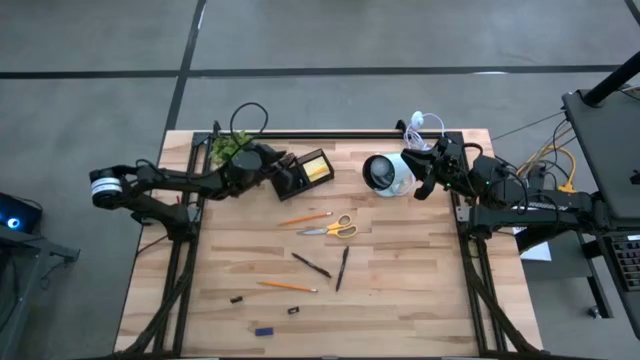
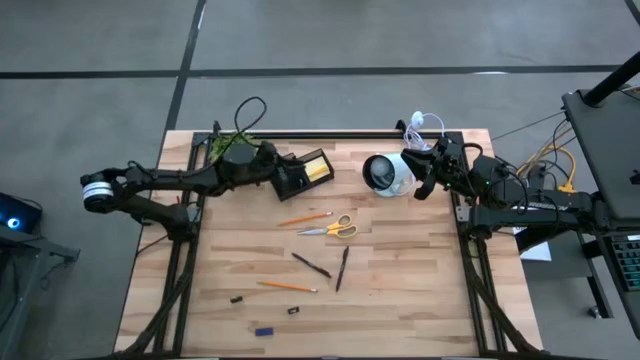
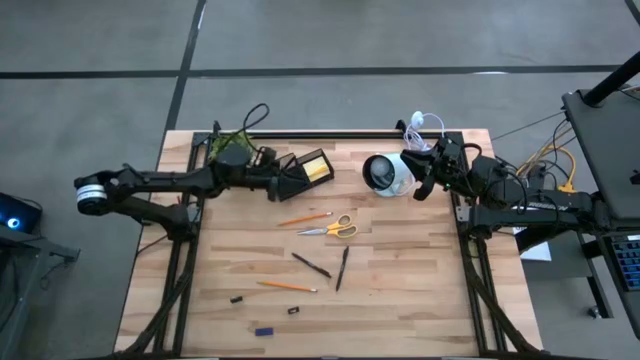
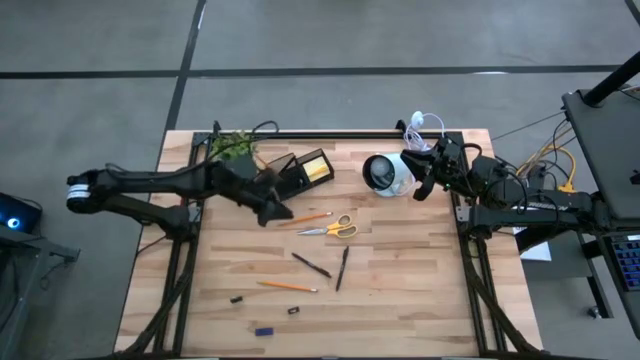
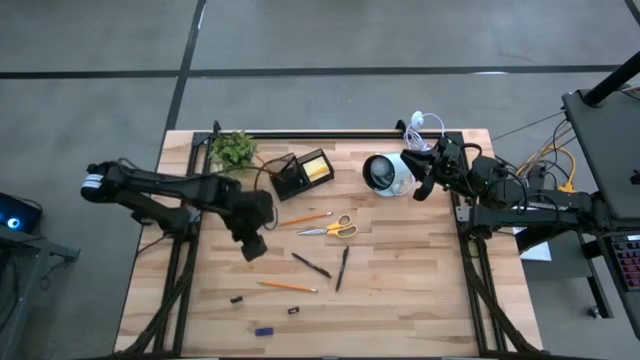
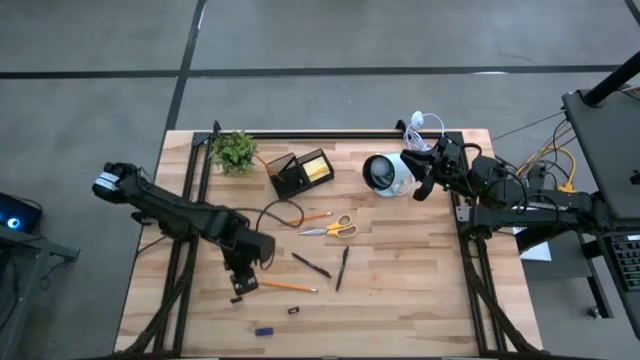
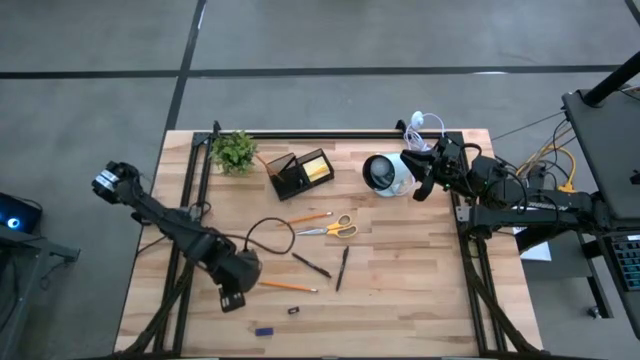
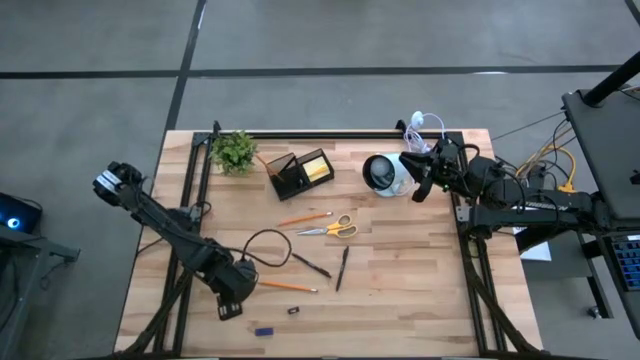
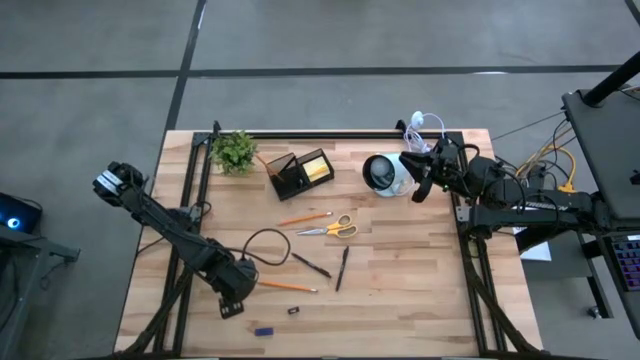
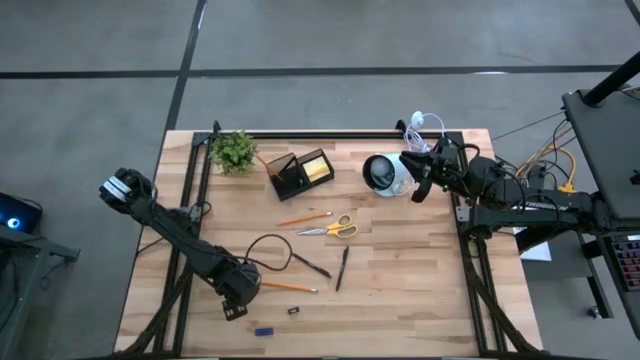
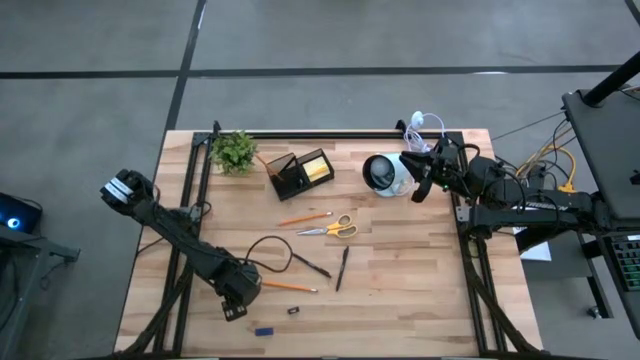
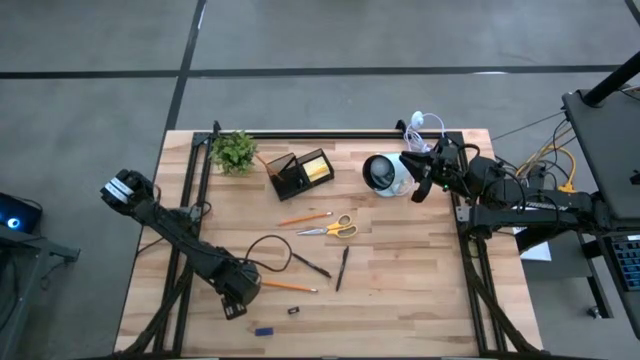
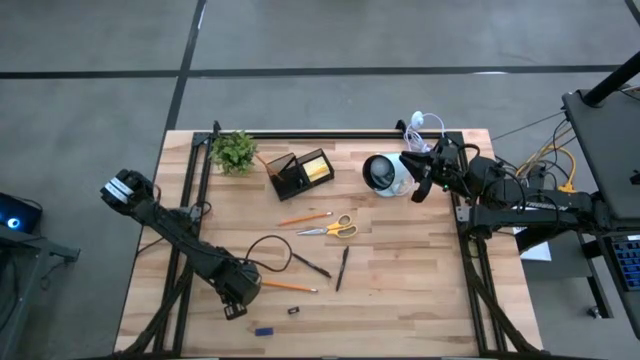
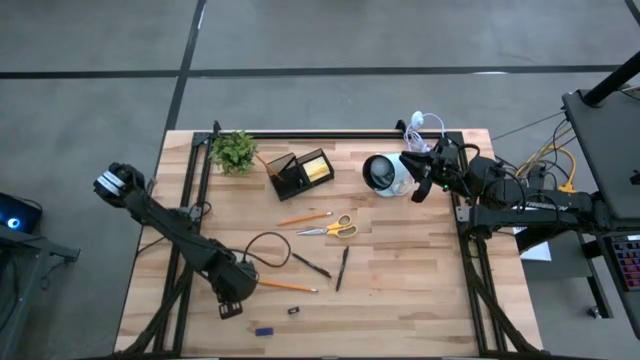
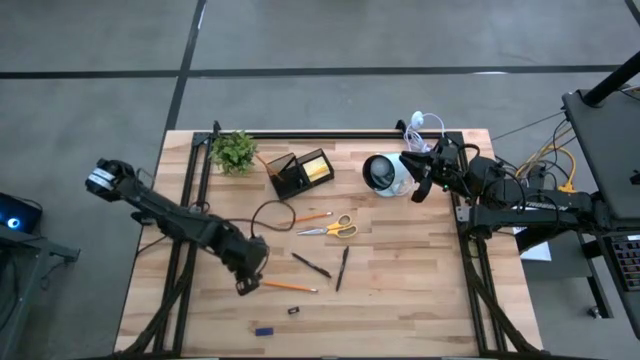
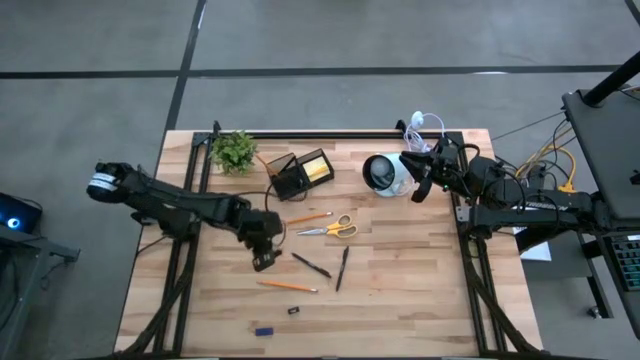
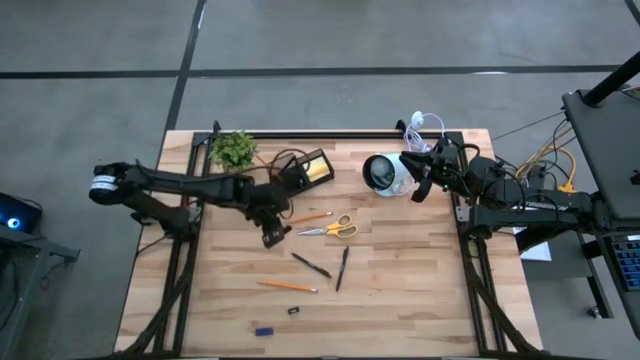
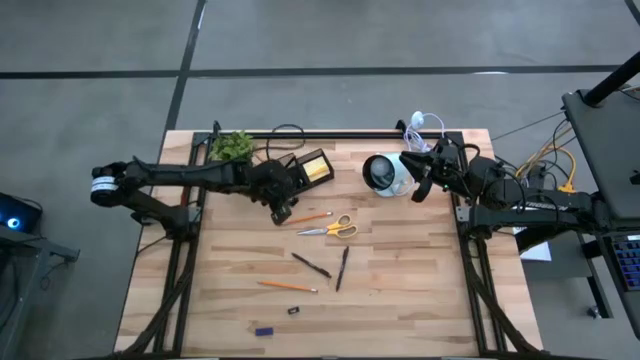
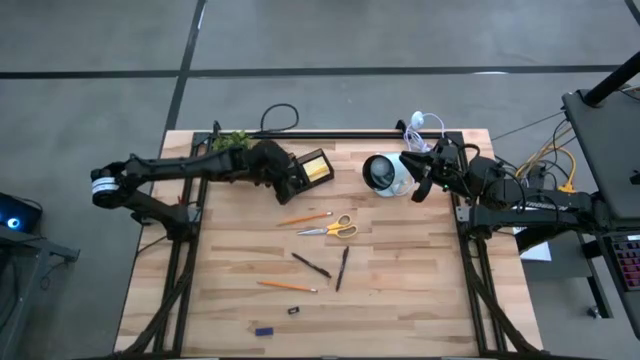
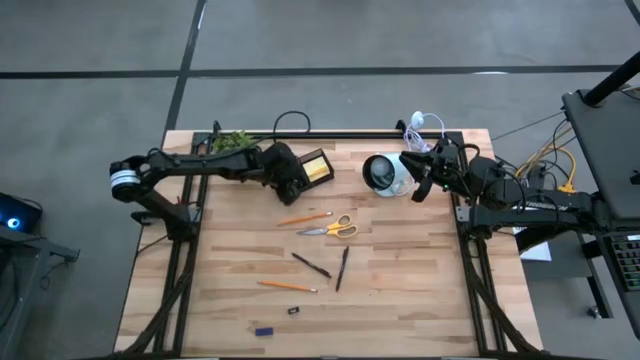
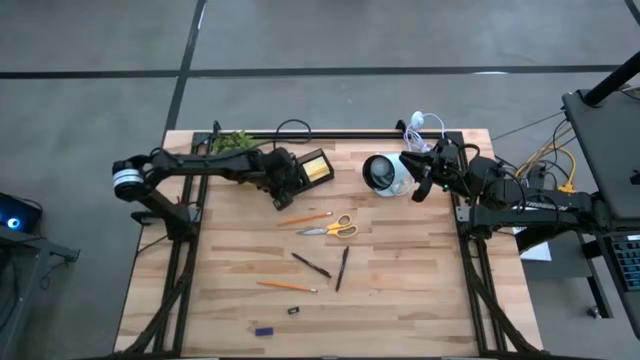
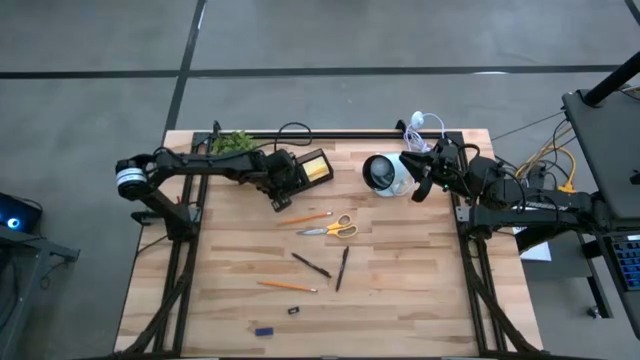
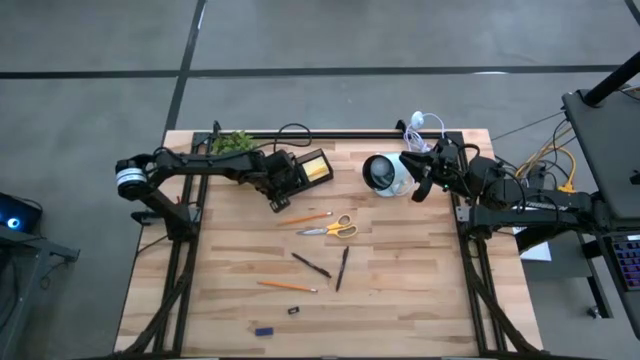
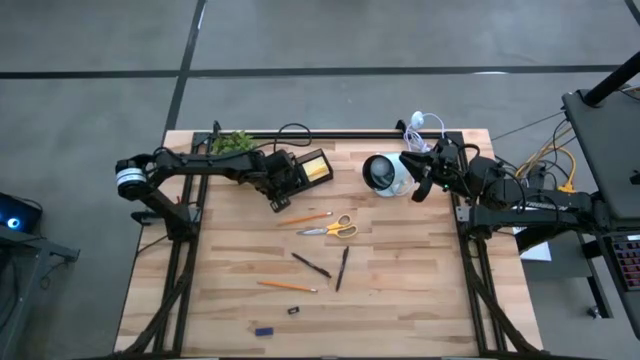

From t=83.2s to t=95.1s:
Task: Pick and place office supplies into organizer
Put the left black binder clip into the black desk organizer

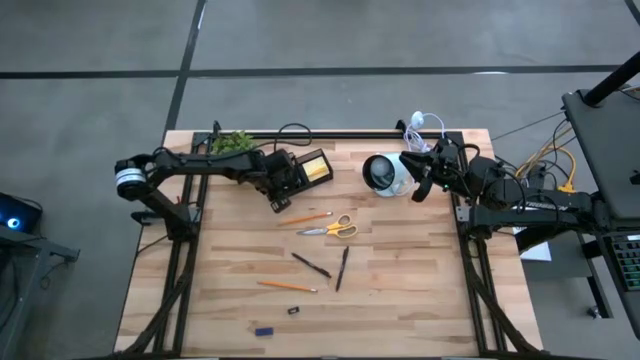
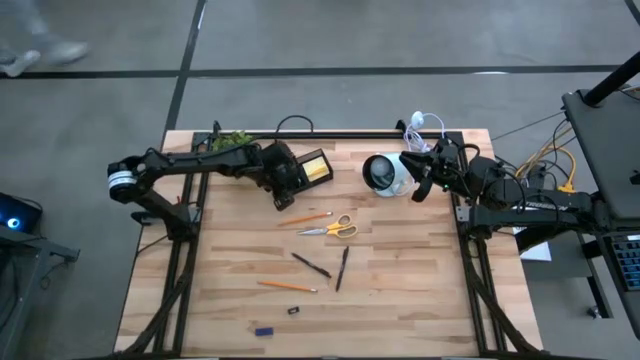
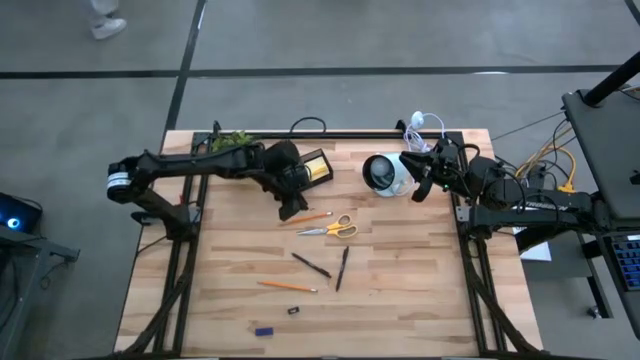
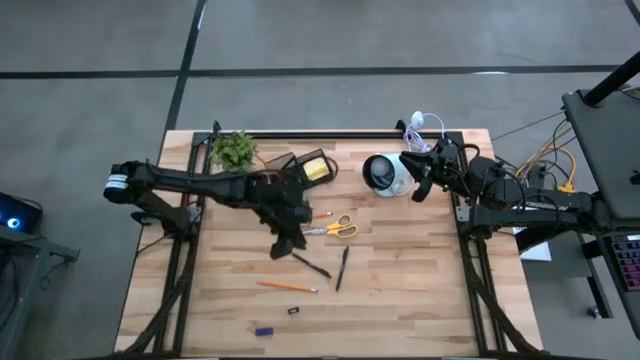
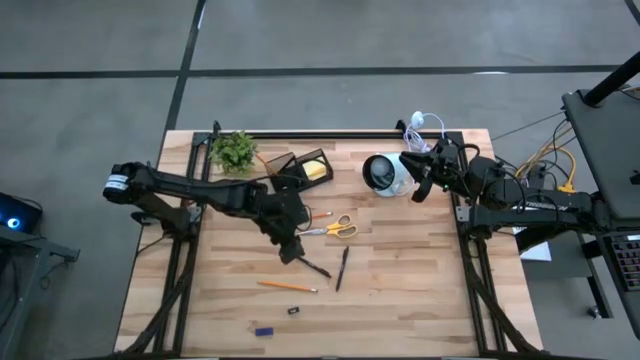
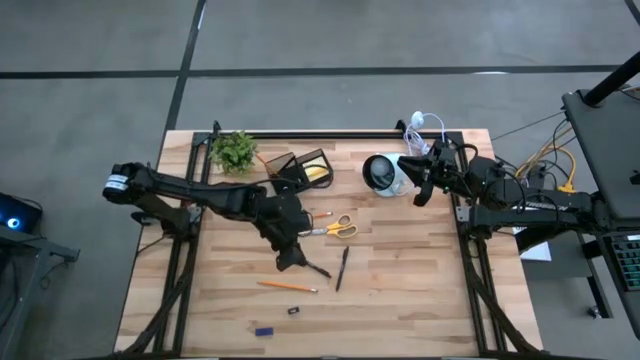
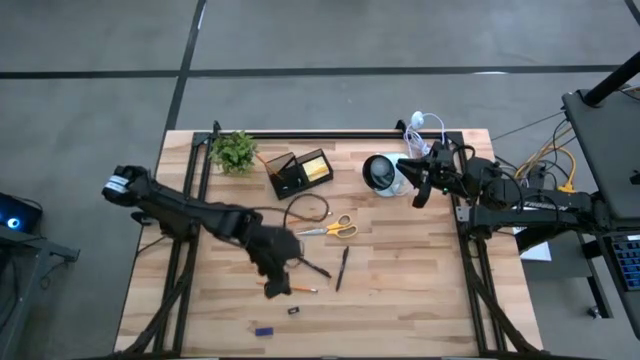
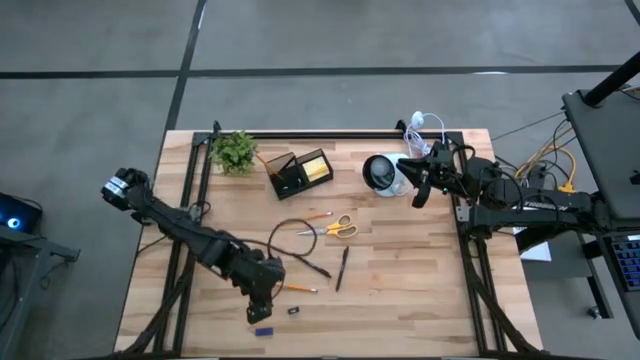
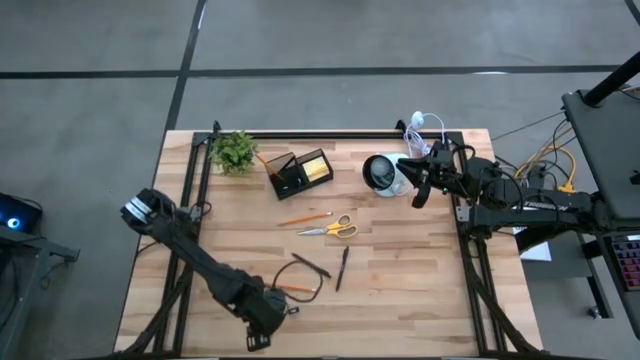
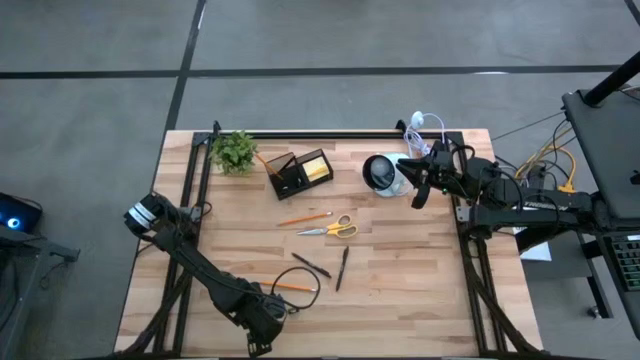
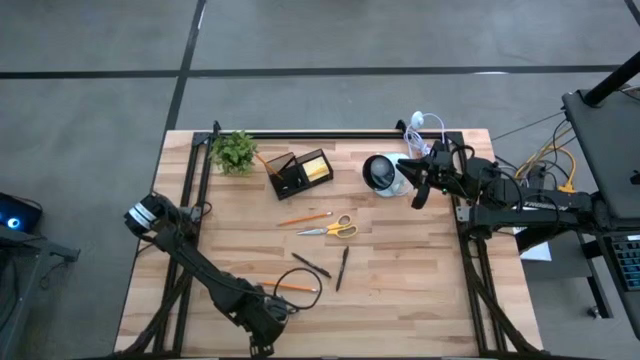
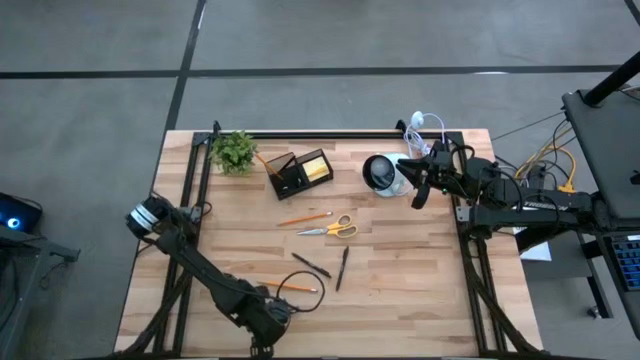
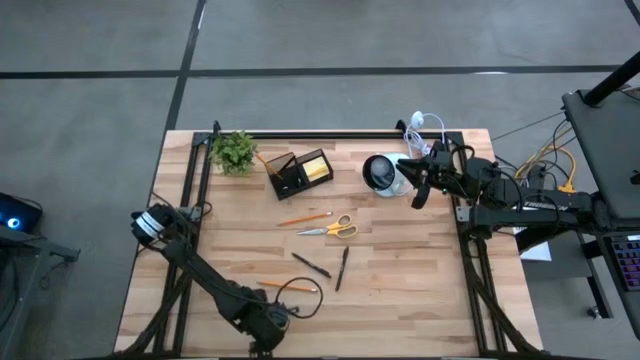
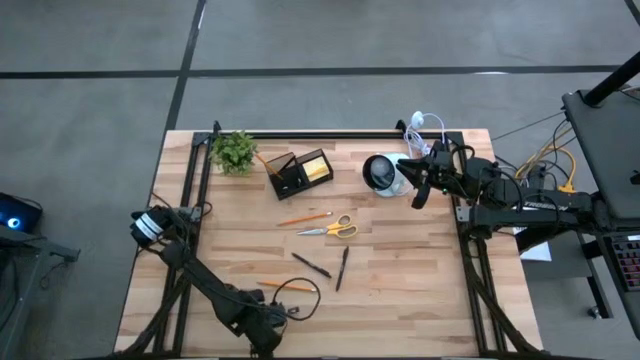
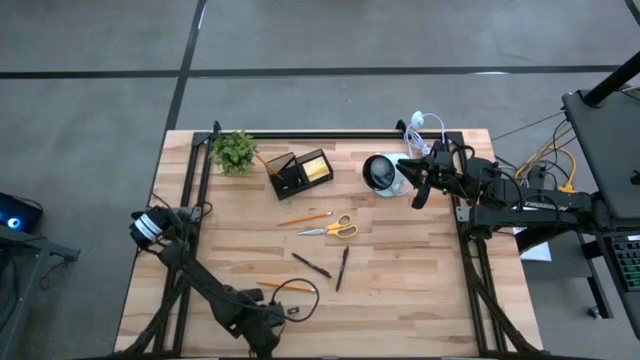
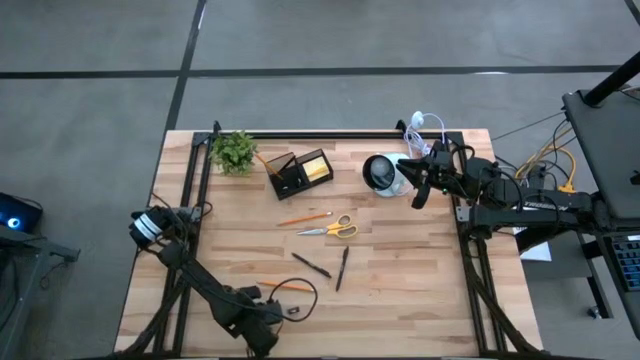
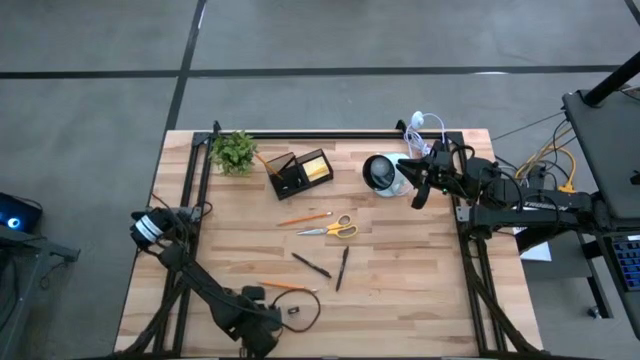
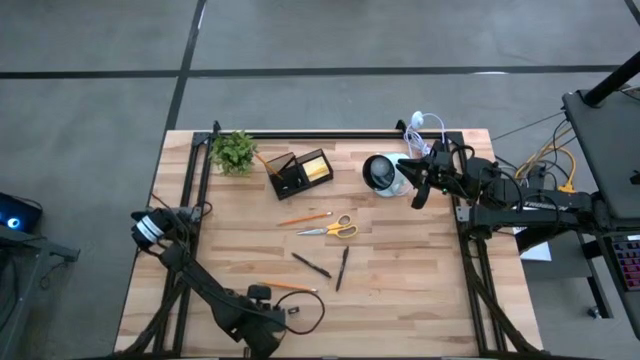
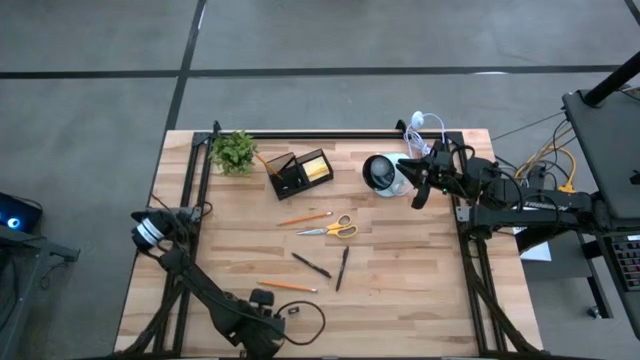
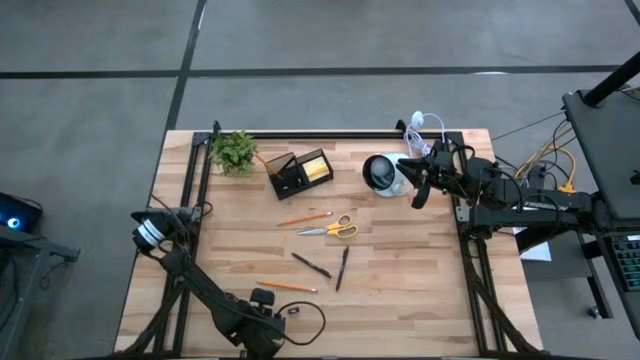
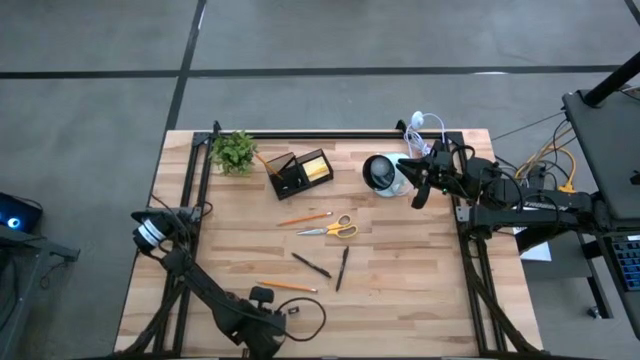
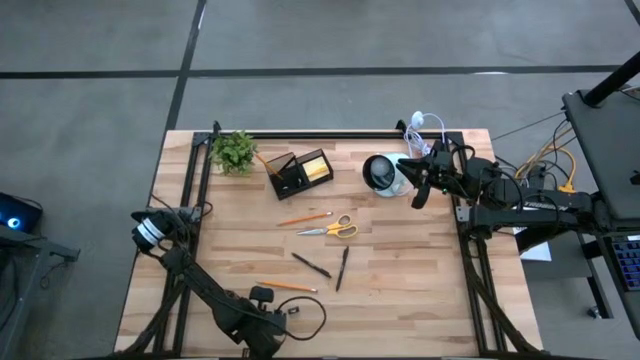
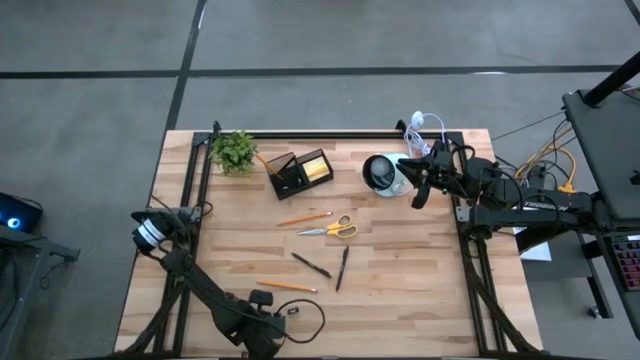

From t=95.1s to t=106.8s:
Put the blue eraser into the black desk organizer
